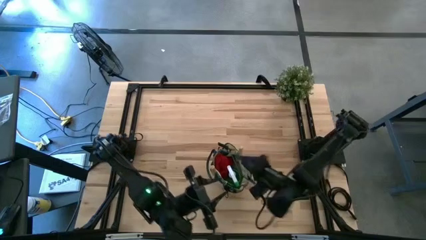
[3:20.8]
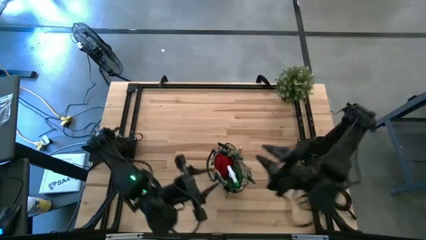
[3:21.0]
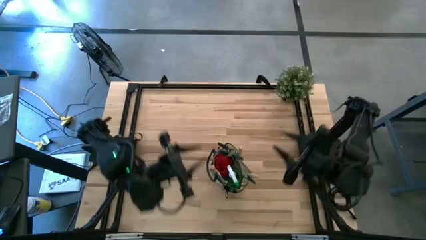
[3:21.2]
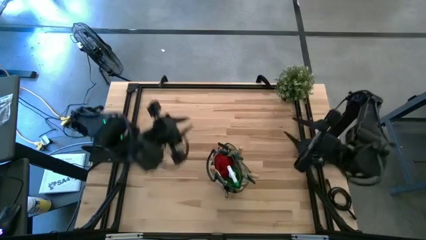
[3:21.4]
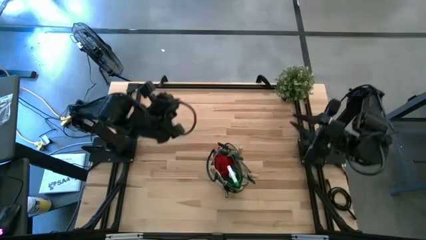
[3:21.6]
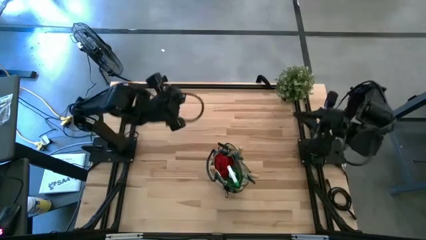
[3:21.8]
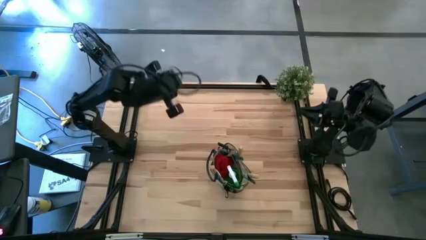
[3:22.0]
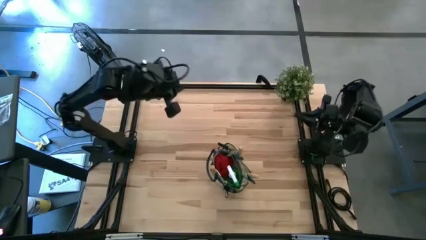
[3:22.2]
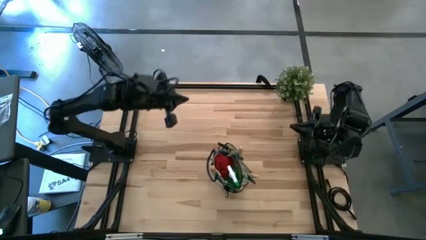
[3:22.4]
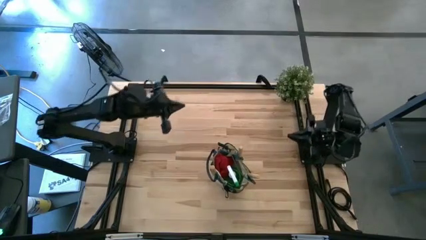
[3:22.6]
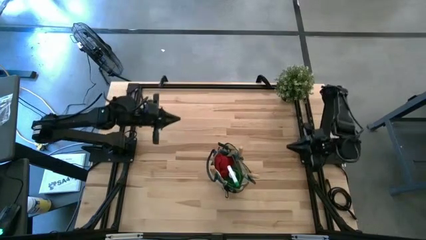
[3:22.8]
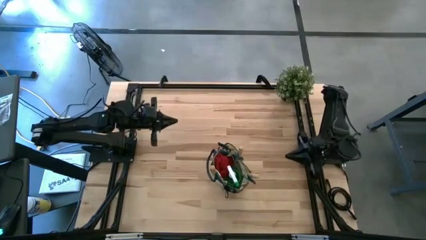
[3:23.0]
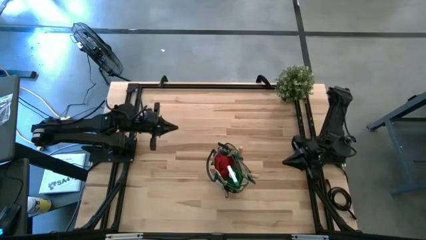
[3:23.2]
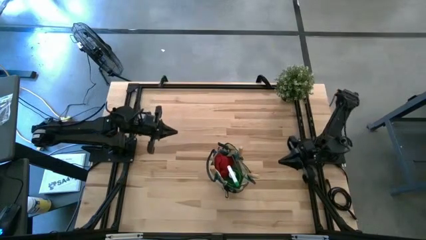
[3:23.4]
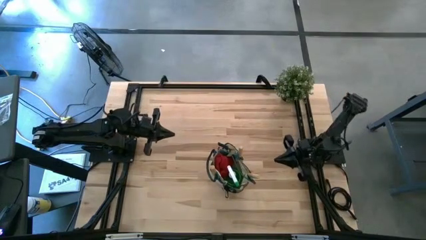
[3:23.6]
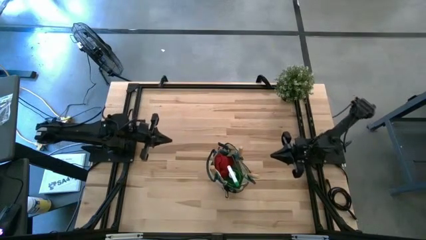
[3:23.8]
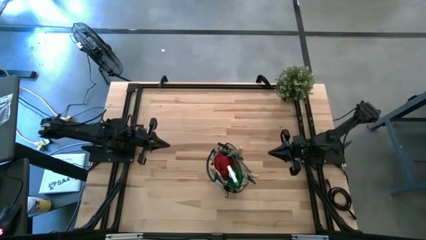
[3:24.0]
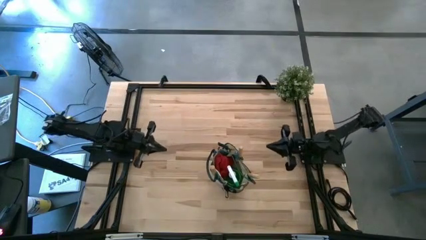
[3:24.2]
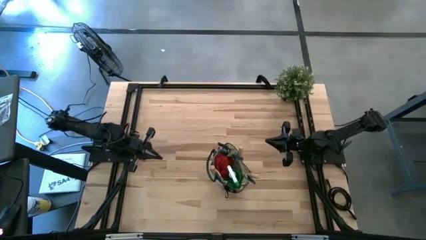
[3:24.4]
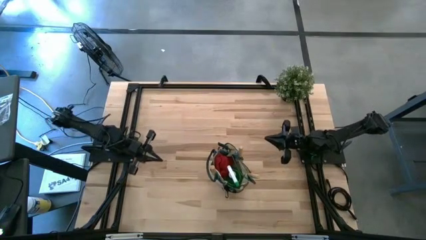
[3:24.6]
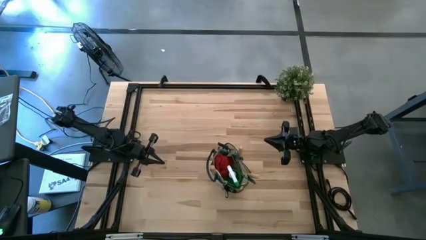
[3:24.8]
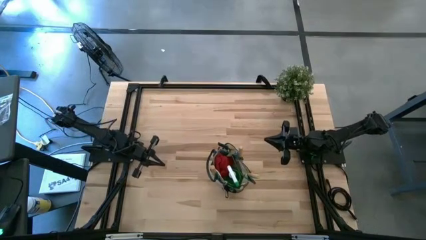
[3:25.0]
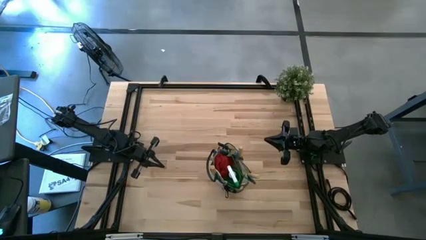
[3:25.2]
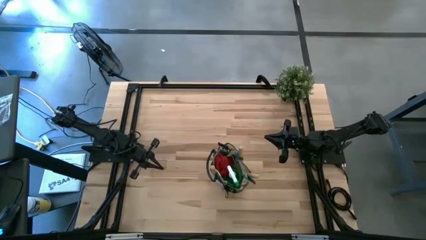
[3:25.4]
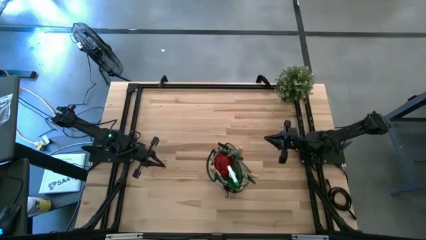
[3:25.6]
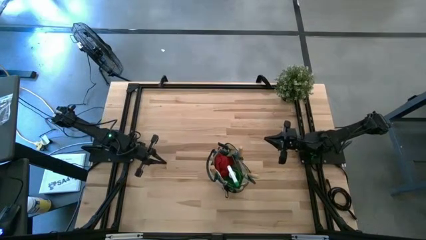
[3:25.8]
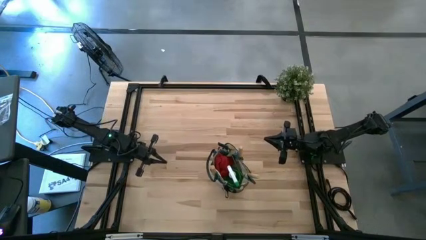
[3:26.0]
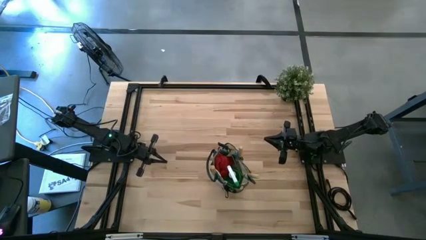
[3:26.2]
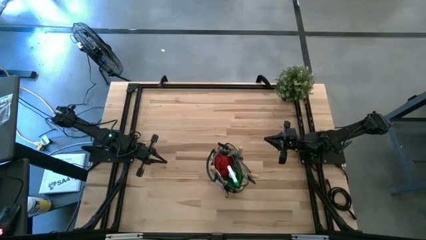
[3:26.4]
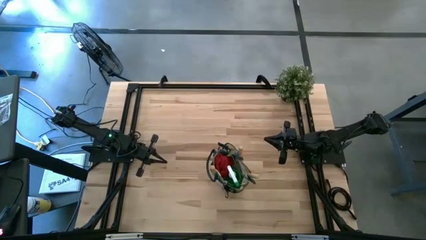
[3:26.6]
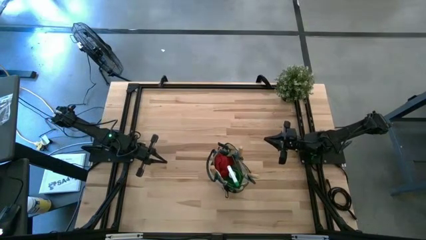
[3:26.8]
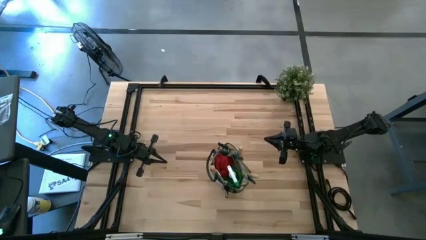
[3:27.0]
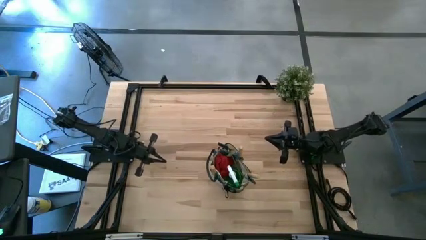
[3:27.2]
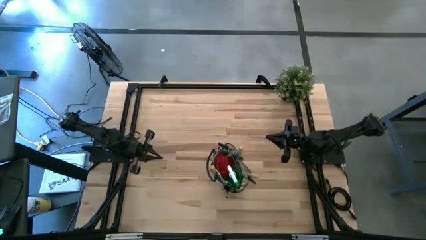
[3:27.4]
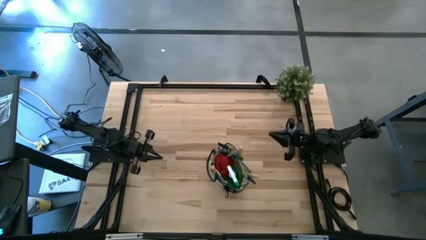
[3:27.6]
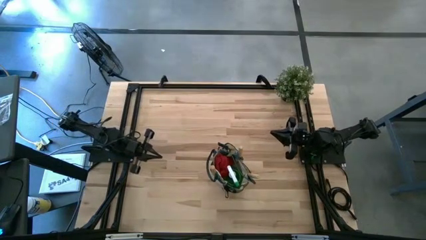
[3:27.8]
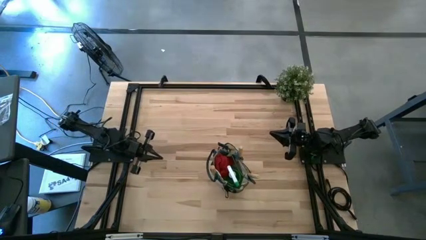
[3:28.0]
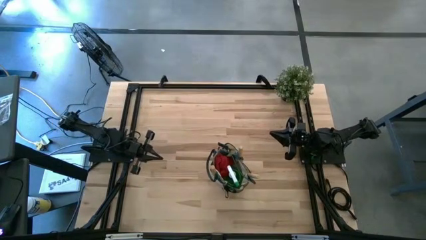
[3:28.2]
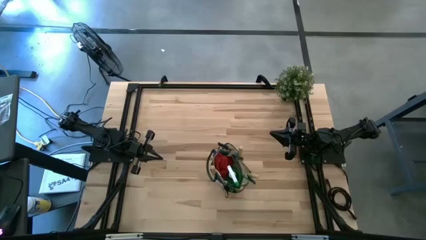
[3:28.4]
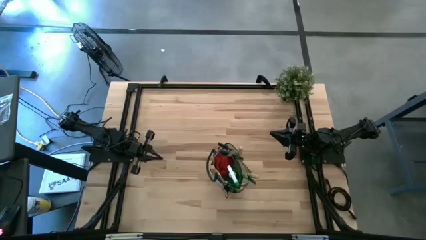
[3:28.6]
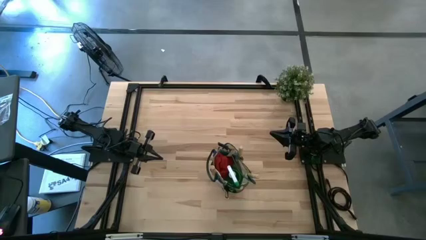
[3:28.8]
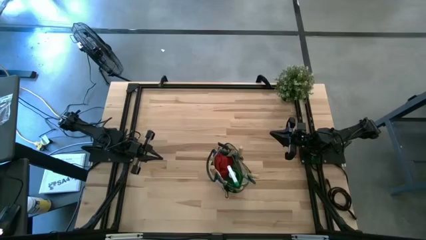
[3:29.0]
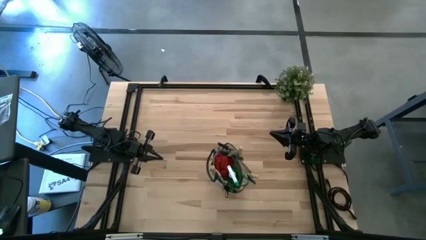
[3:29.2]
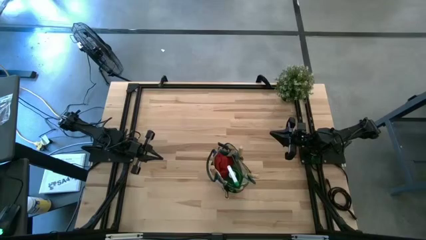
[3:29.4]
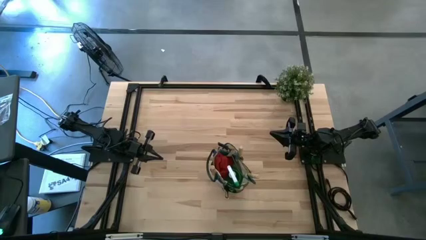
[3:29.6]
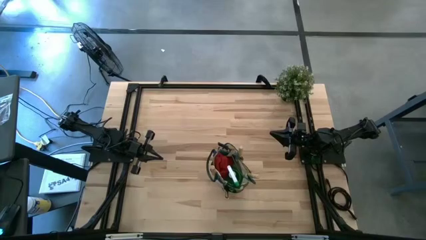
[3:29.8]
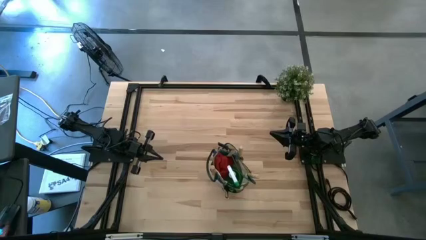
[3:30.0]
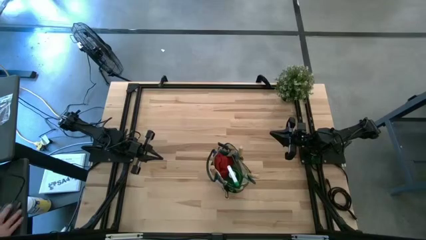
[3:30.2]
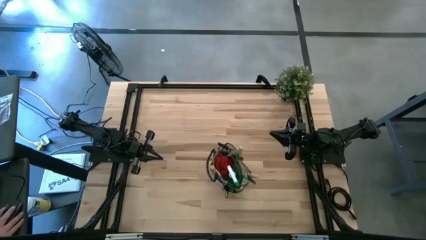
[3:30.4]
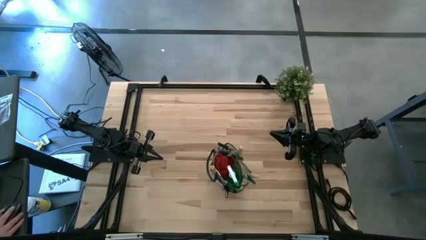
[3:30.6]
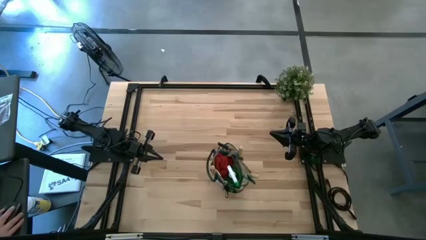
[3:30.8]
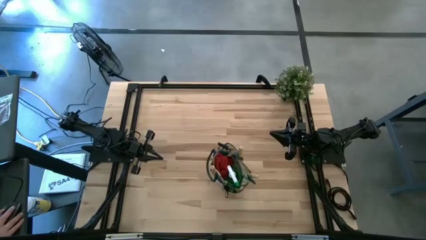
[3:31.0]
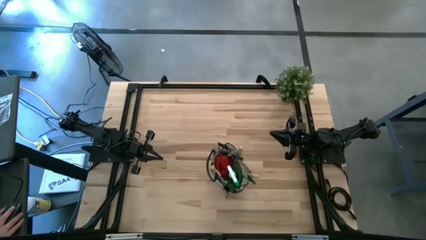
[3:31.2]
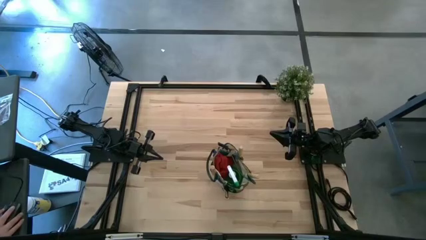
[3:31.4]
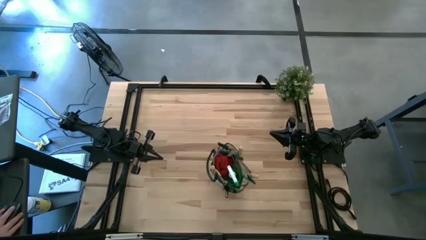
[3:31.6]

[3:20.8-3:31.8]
Task: Pick & Place Garden tools in Gardening bag
Return to Home Position

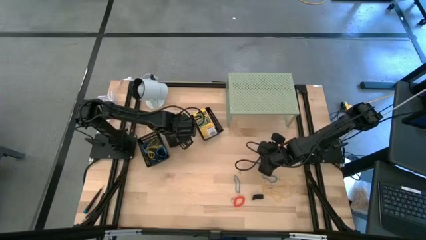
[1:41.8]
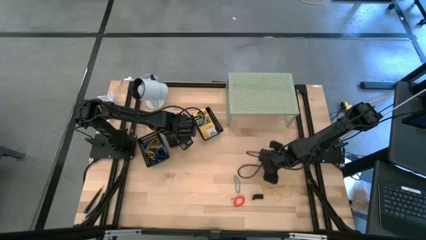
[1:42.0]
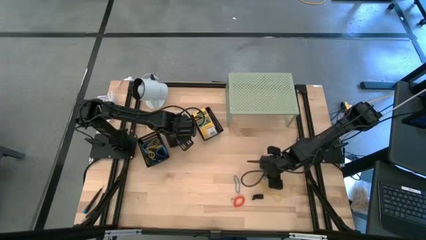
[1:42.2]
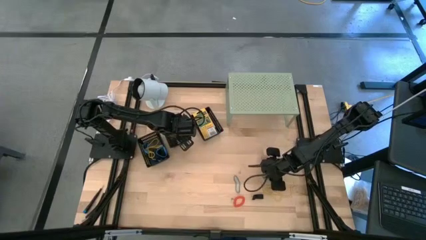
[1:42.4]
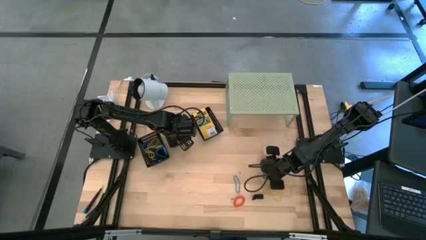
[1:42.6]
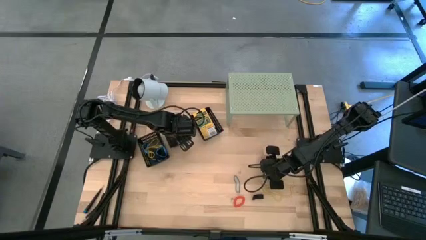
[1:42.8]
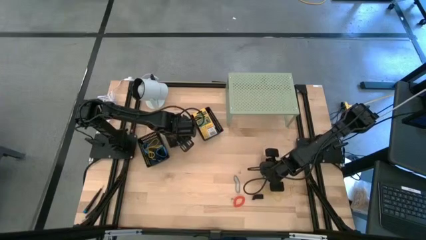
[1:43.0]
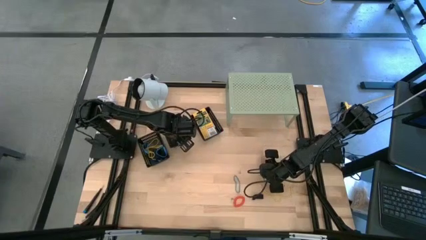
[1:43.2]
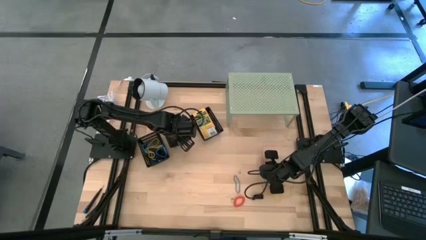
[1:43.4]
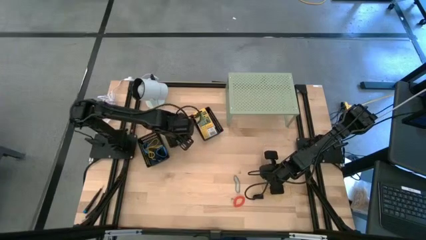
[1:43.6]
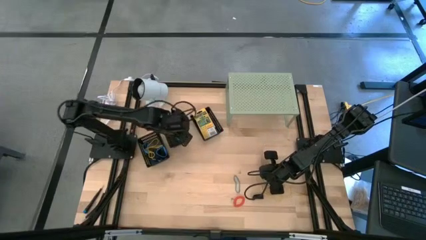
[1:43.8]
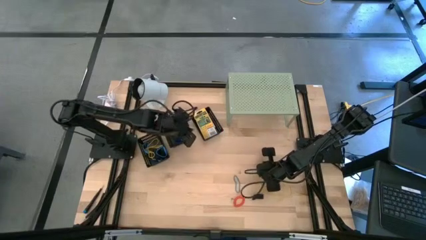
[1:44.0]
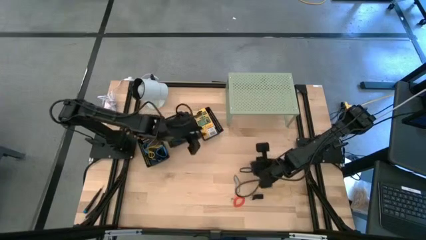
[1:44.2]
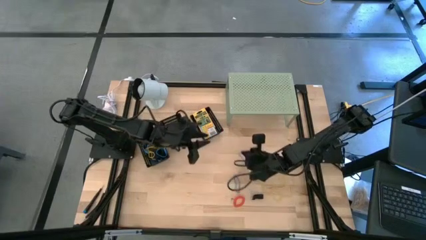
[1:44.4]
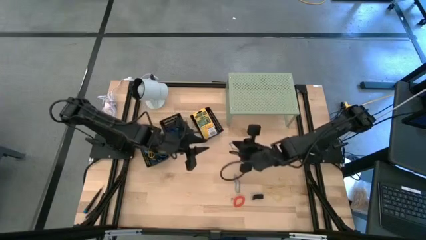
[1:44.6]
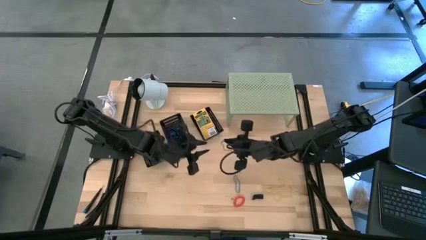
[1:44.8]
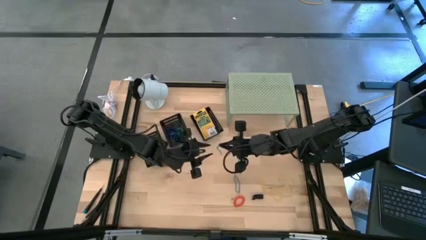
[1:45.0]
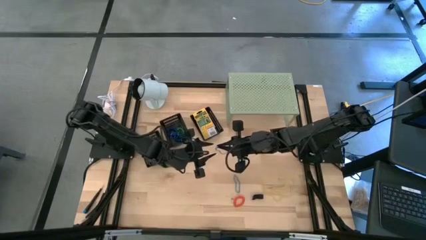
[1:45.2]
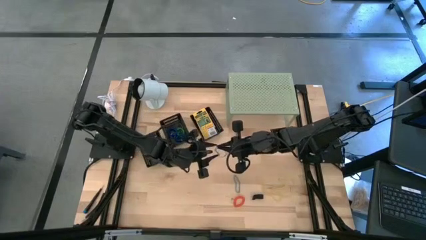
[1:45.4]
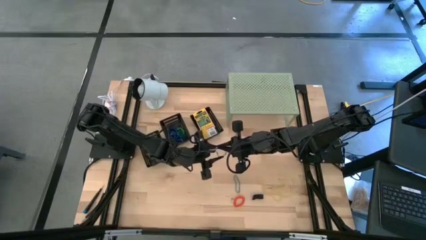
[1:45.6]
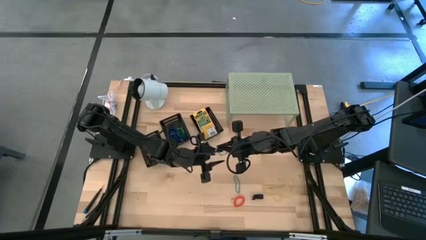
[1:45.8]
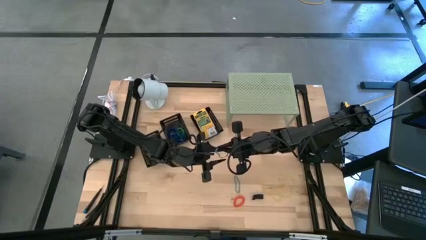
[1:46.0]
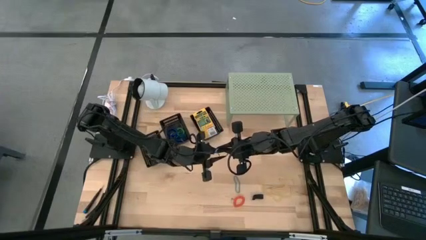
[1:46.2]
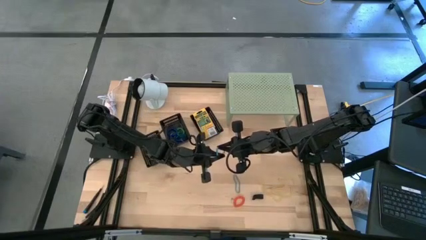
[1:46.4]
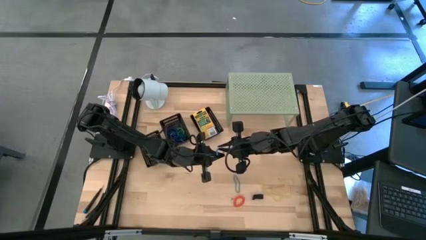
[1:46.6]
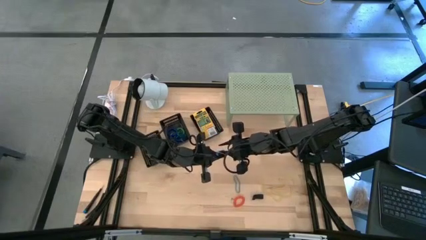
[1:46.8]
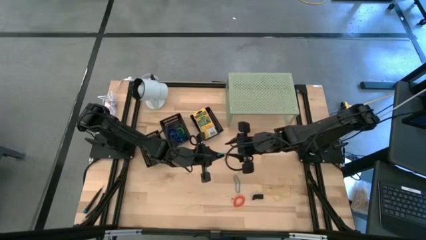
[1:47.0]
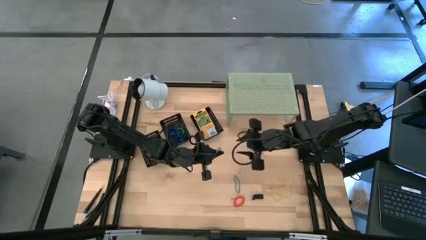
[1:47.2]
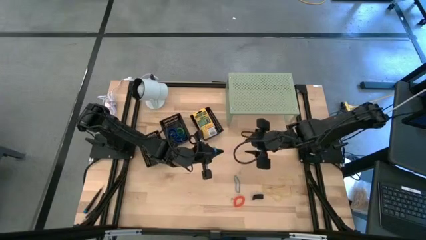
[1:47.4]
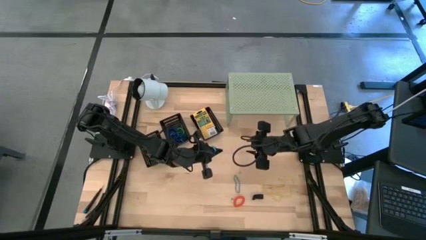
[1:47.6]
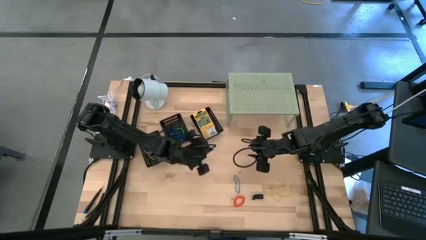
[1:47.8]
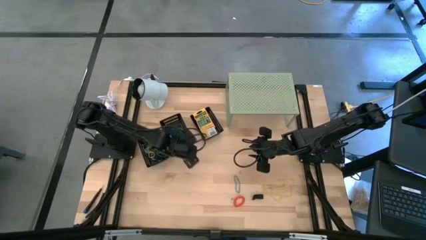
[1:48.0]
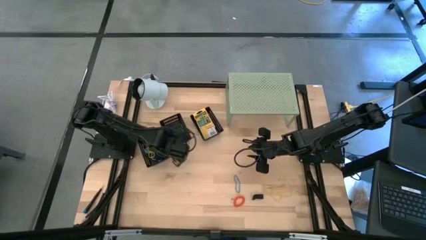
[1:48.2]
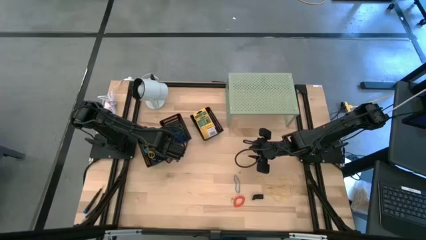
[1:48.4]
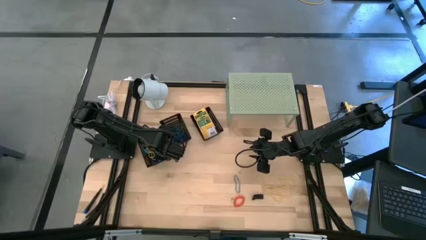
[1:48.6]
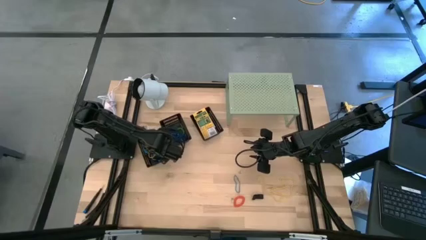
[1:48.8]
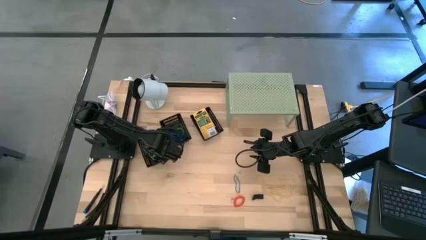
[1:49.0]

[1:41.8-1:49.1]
Task: Pick & Place Office Desk Supplies
Put the blue rubber band into the left black basket
